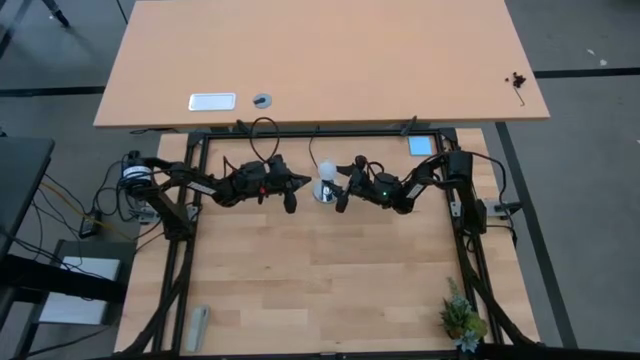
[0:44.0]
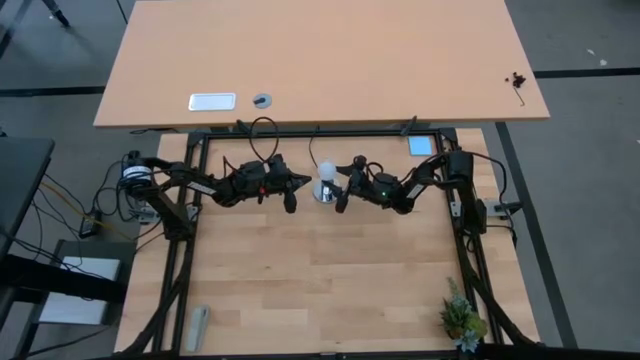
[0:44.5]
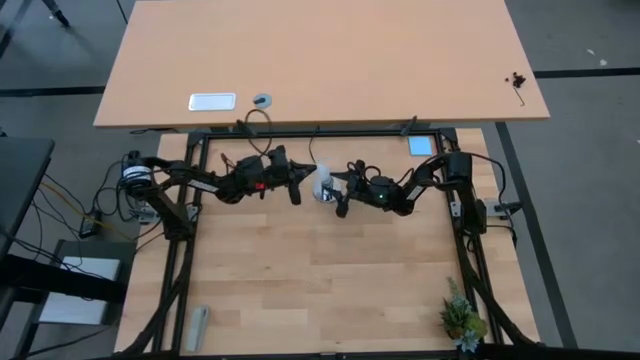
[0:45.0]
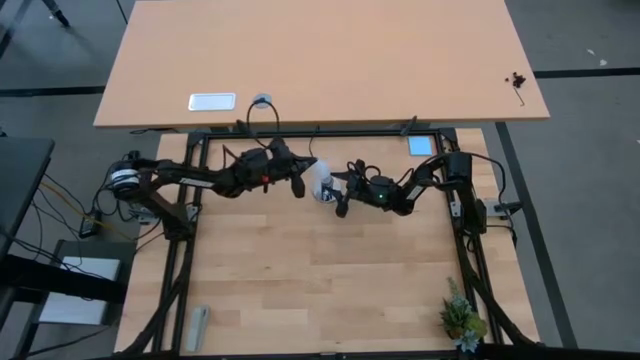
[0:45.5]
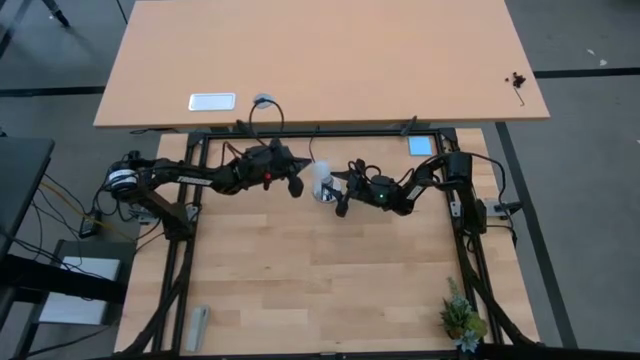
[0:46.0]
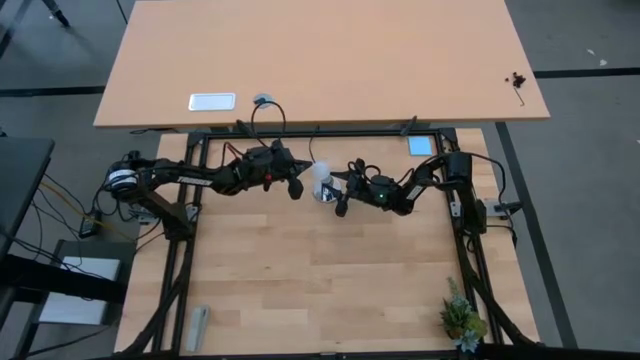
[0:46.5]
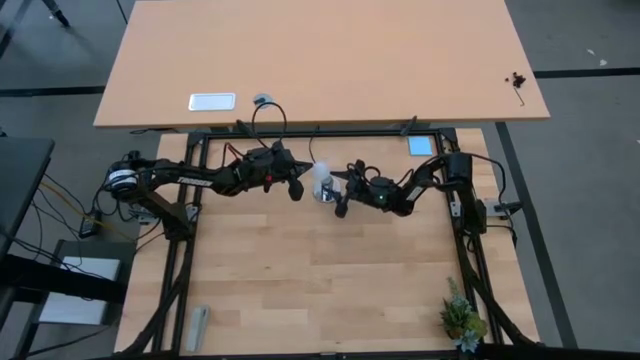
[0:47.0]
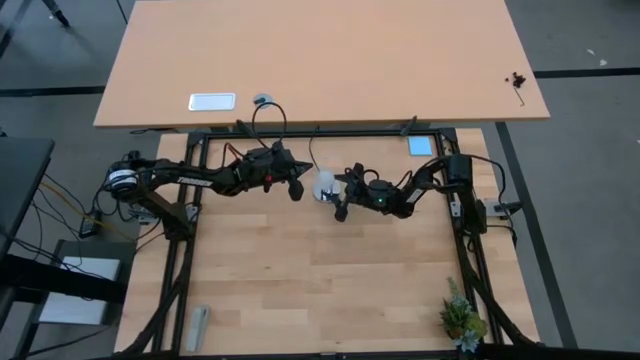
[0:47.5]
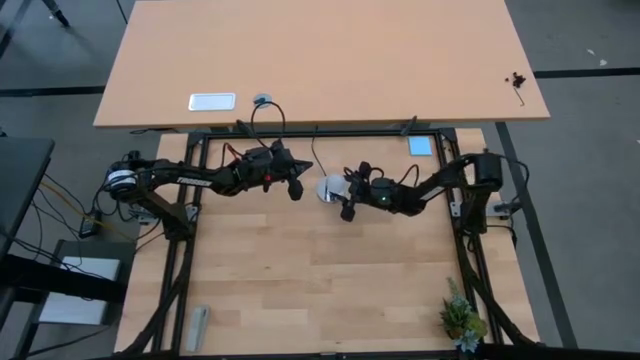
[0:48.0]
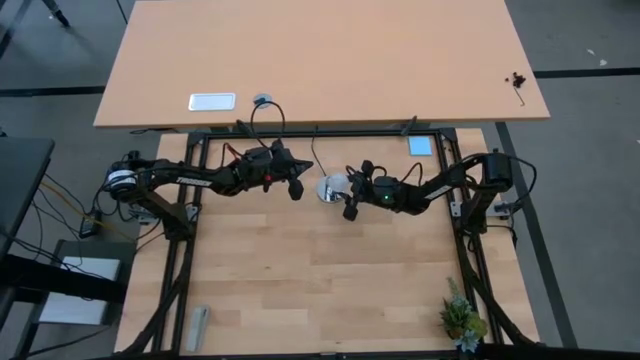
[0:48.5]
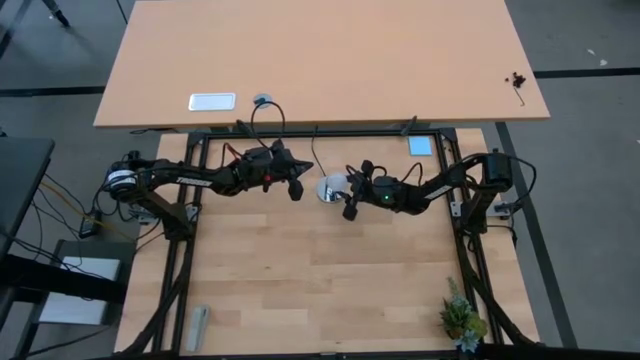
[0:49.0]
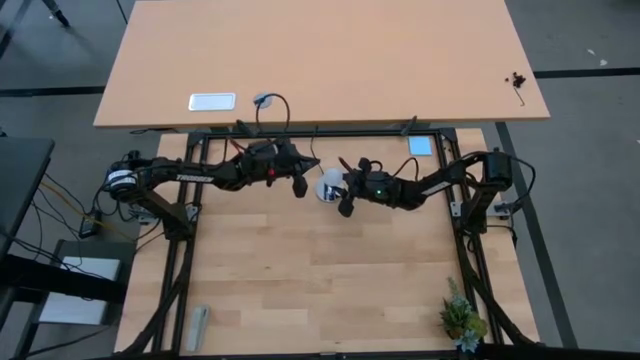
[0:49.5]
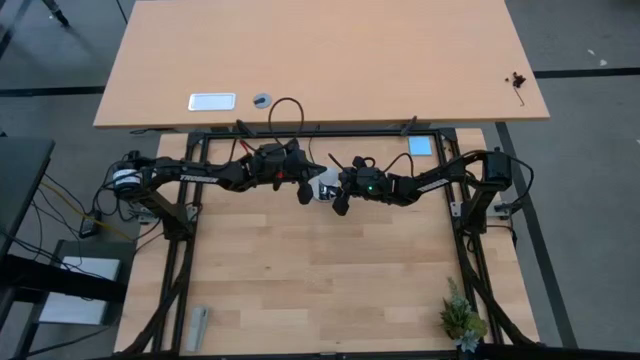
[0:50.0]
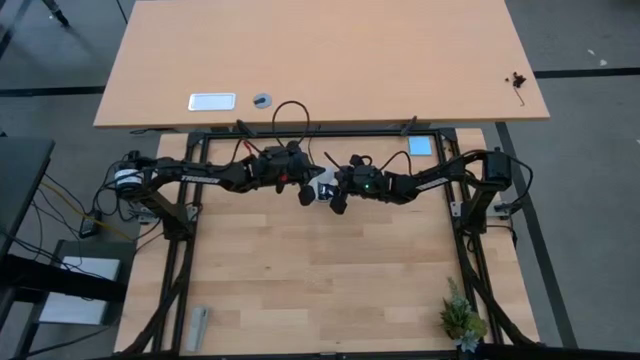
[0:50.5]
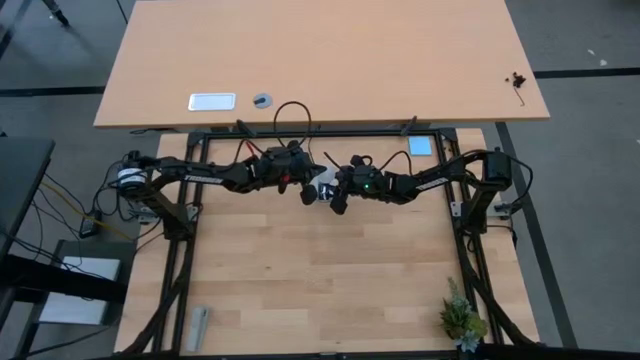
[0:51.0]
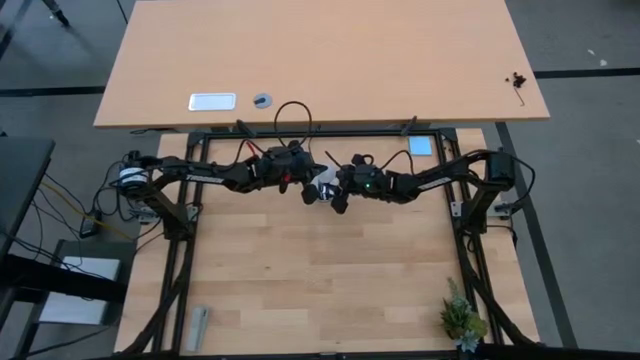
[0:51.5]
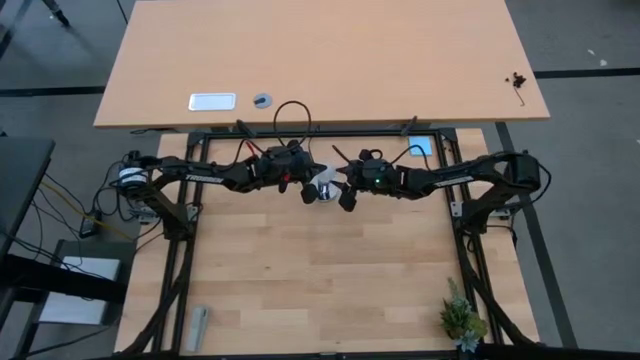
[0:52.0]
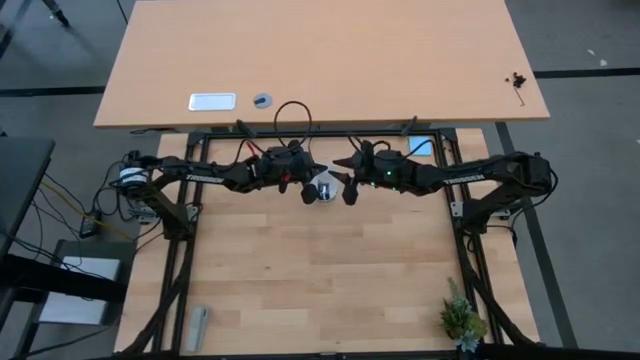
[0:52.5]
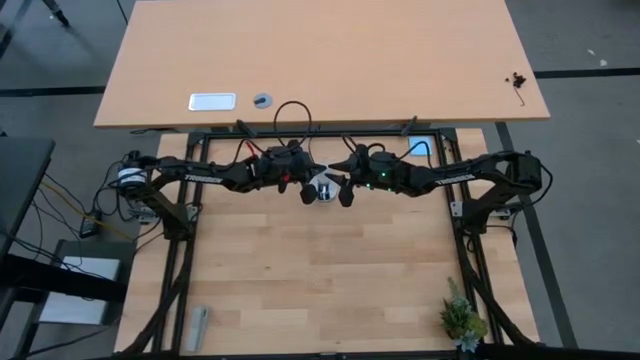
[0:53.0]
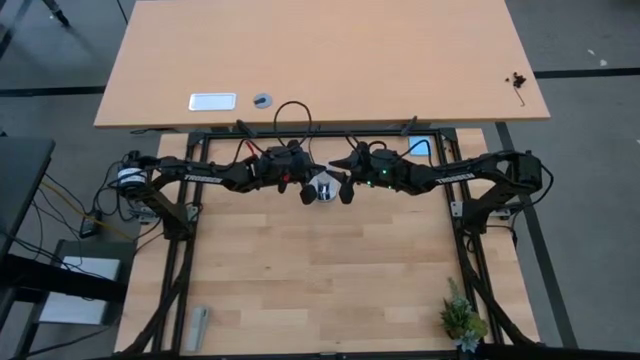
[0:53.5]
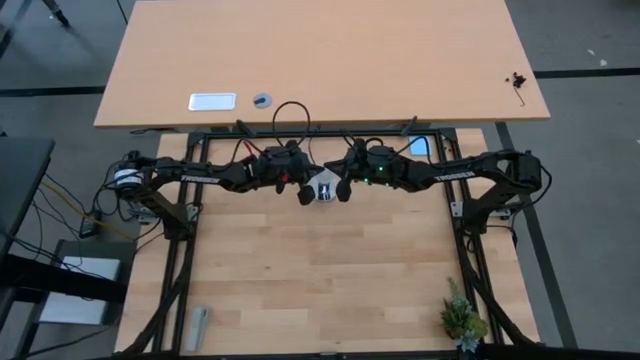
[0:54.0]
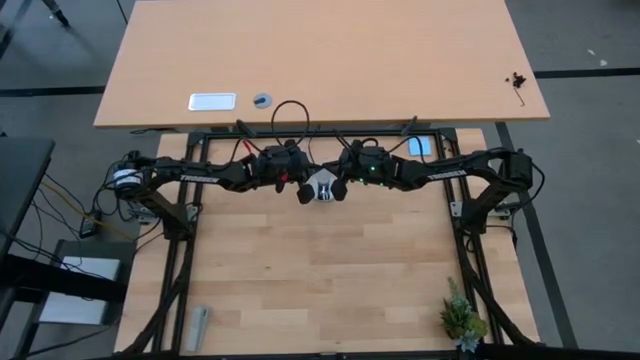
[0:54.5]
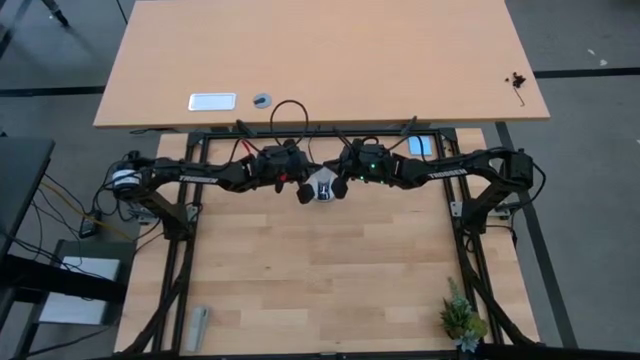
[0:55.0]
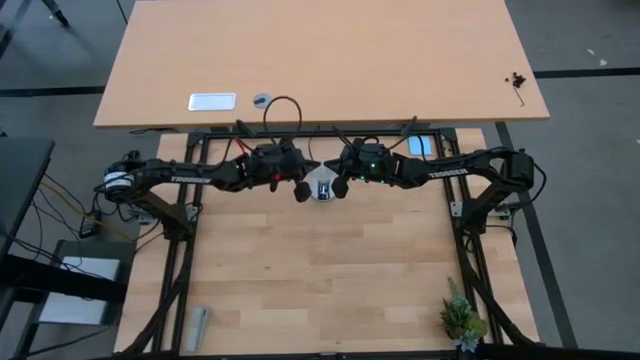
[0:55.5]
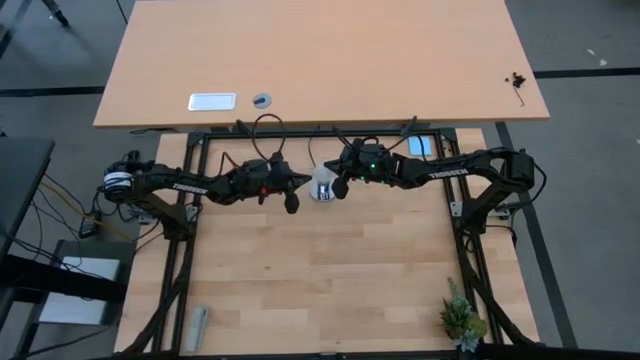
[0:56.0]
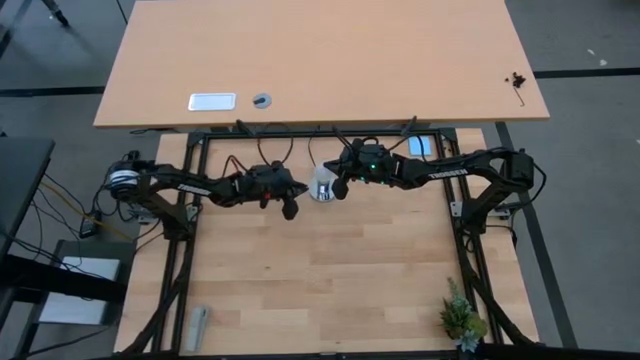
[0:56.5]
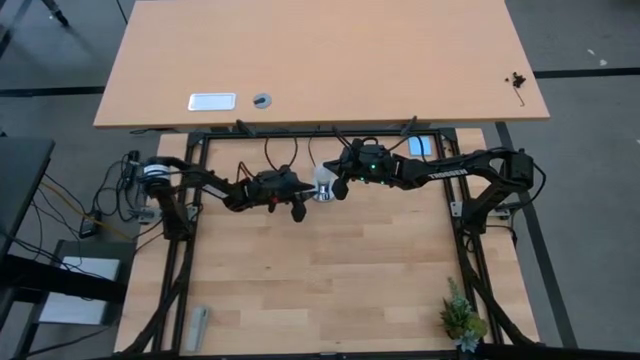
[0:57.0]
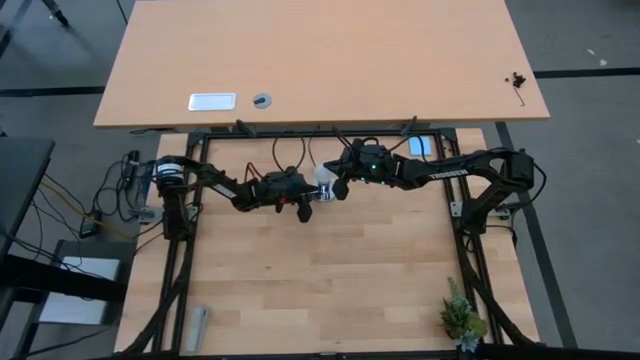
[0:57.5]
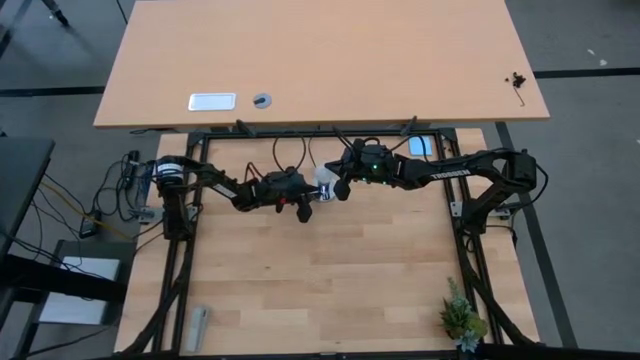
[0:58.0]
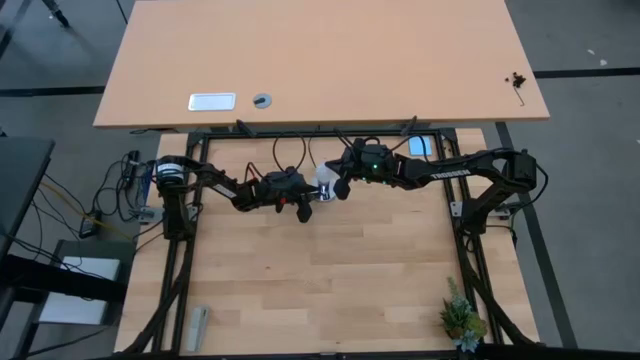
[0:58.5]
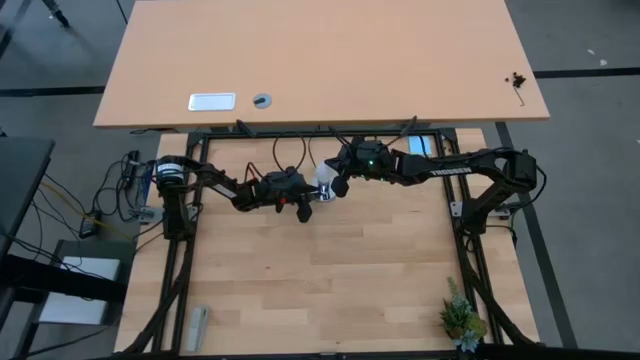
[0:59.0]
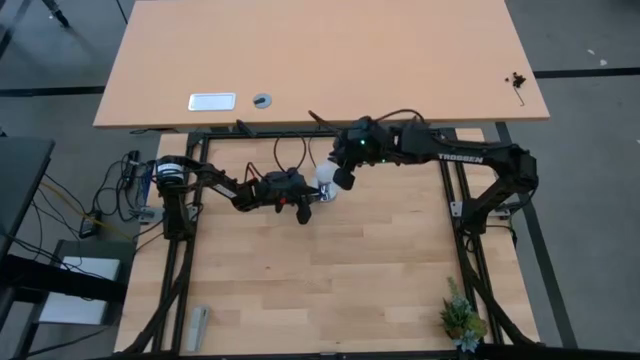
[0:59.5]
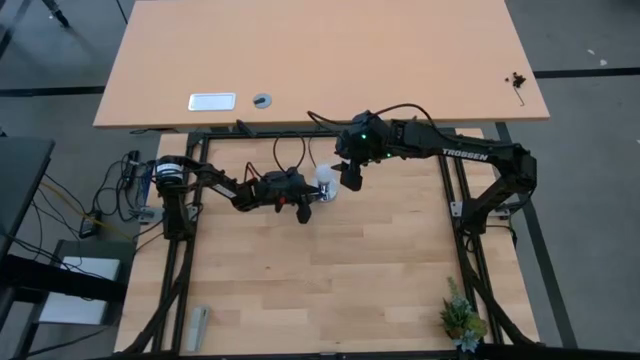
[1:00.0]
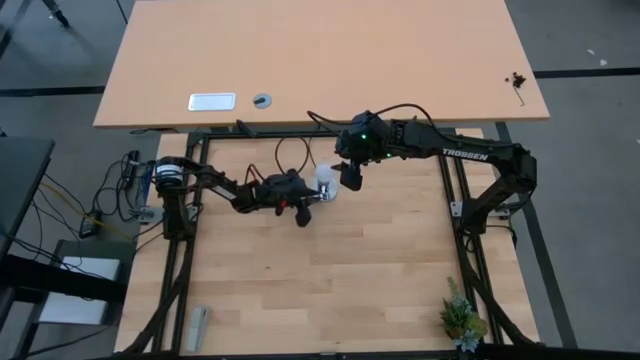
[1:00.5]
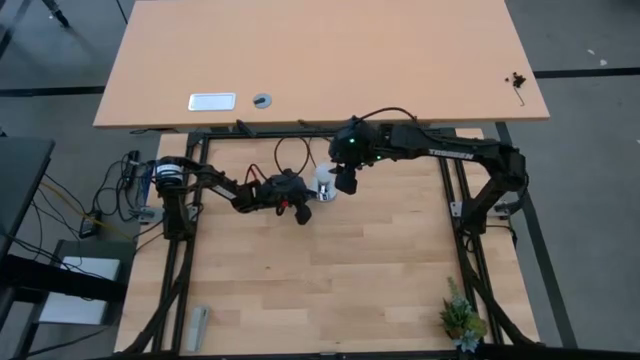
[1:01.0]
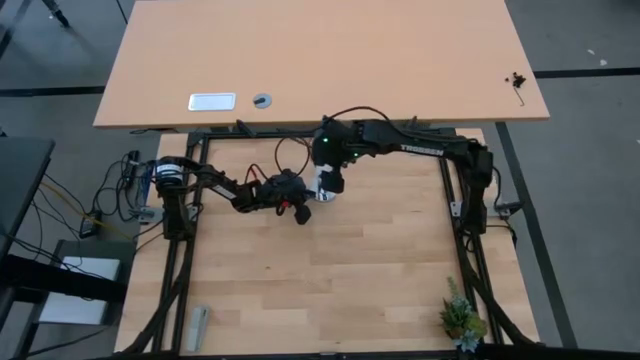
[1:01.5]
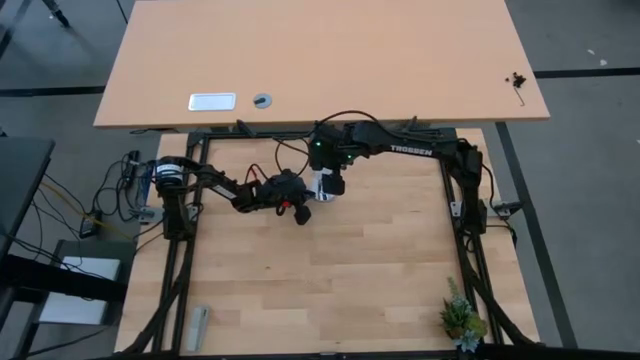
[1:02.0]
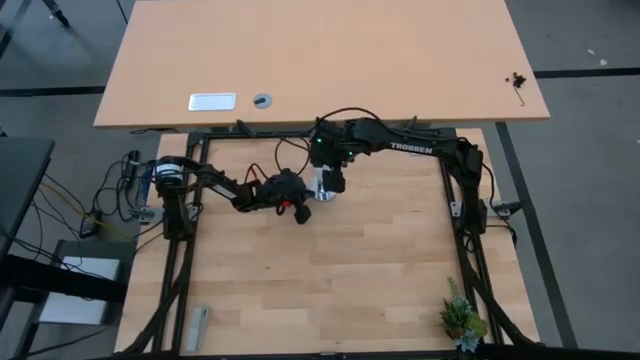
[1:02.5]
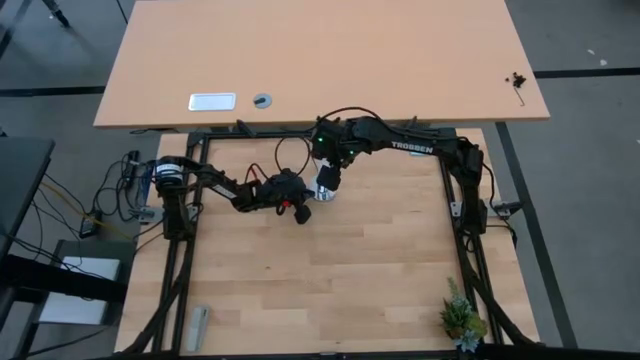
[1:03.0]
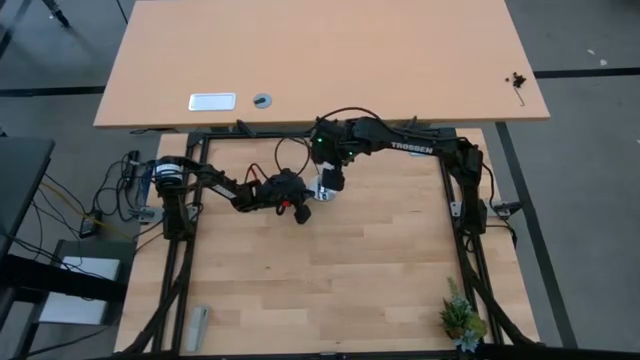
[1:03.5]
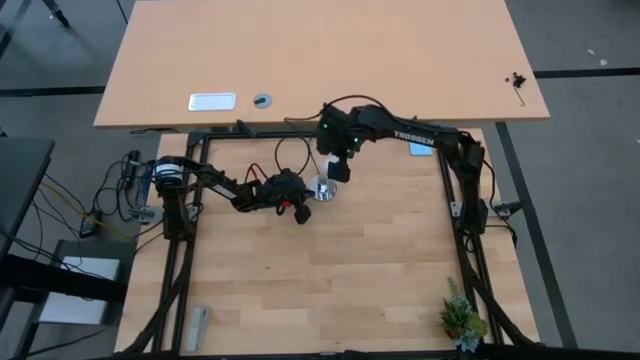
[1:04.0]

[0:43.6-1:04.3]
Task: Screw lightbulb
Insert the lightbulb into the lamp
